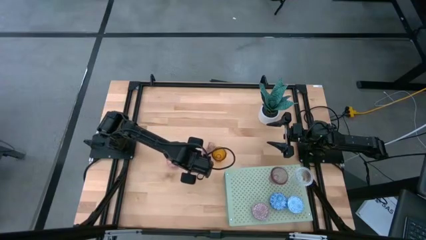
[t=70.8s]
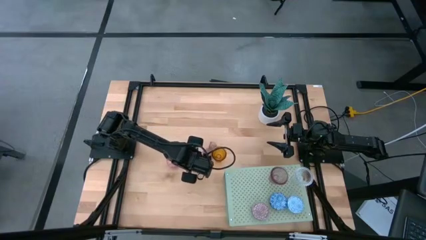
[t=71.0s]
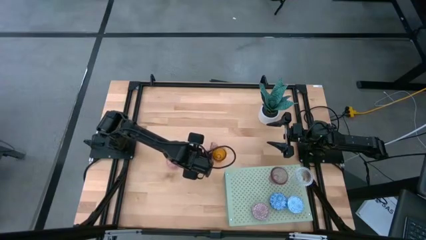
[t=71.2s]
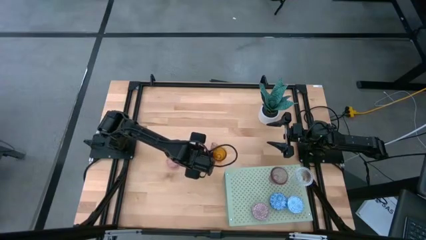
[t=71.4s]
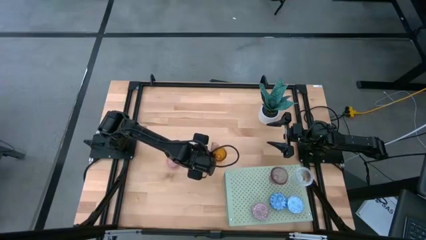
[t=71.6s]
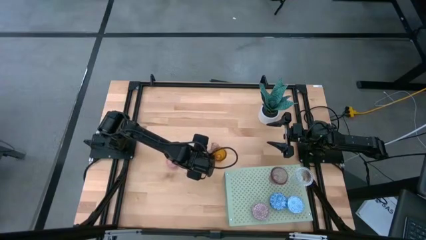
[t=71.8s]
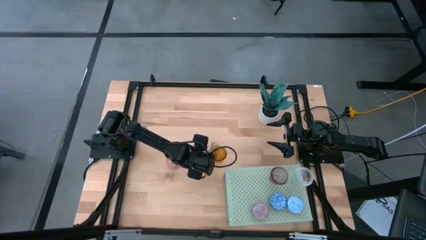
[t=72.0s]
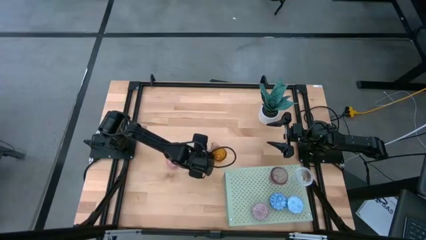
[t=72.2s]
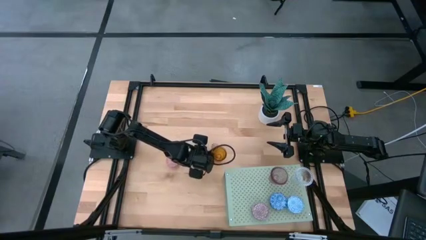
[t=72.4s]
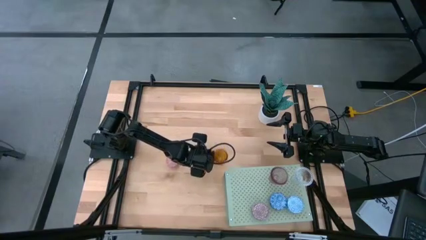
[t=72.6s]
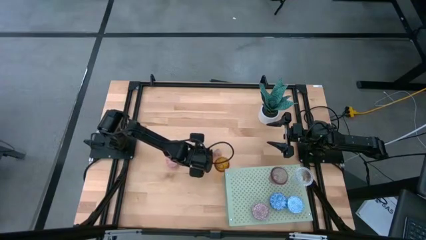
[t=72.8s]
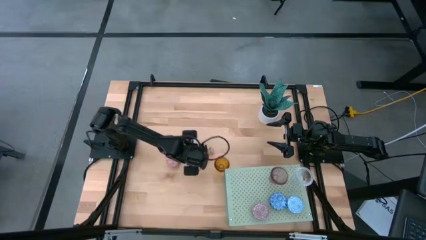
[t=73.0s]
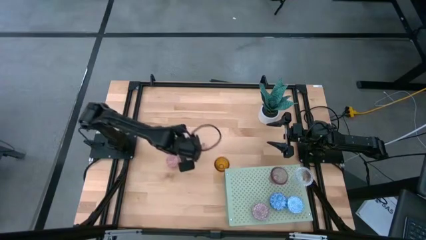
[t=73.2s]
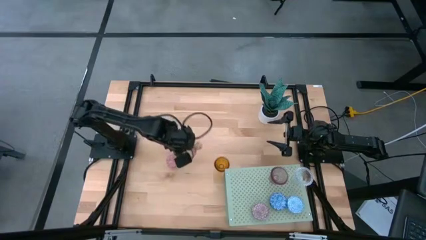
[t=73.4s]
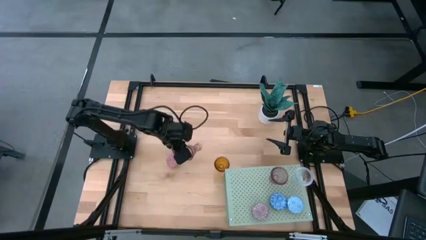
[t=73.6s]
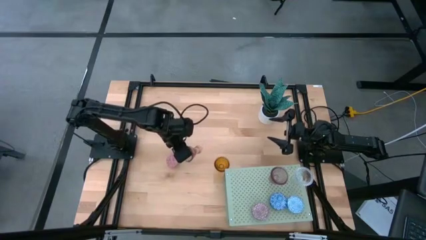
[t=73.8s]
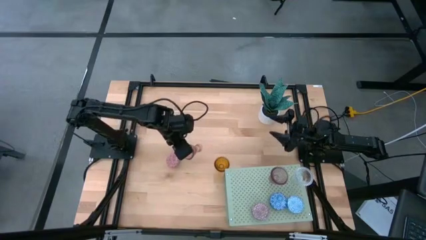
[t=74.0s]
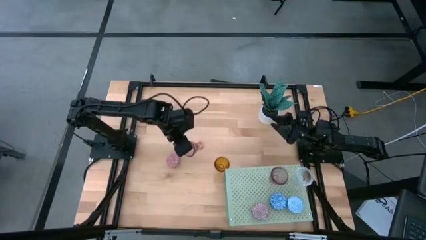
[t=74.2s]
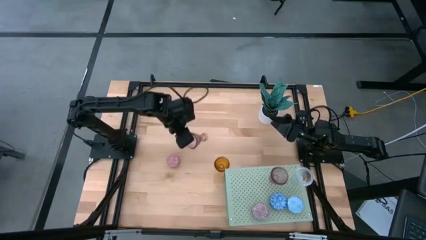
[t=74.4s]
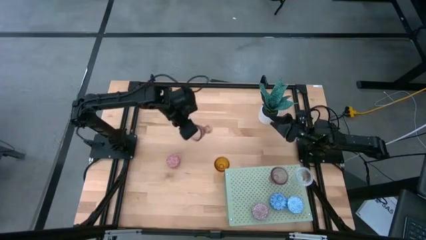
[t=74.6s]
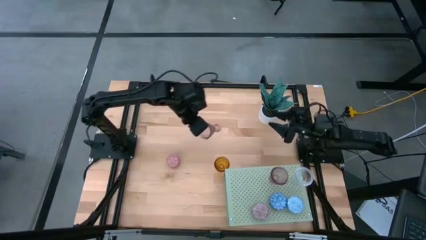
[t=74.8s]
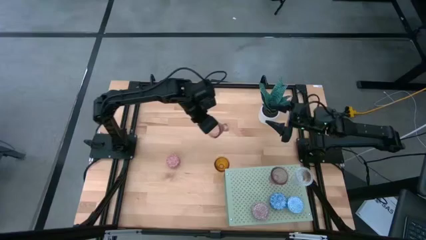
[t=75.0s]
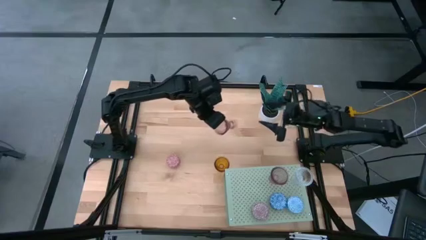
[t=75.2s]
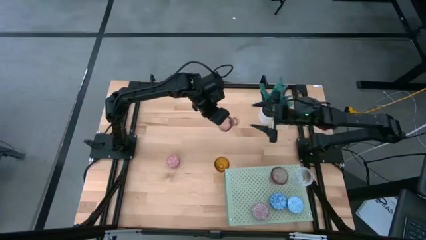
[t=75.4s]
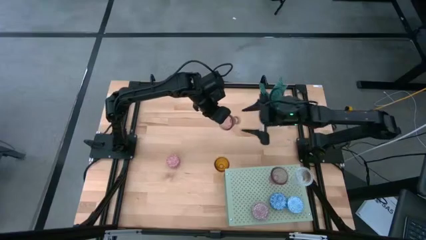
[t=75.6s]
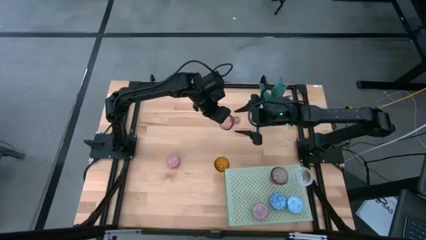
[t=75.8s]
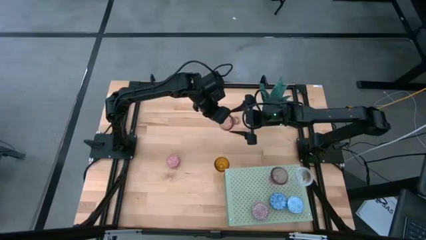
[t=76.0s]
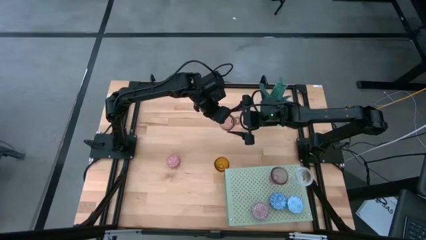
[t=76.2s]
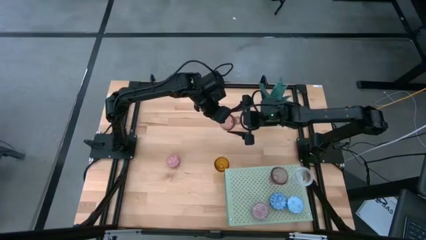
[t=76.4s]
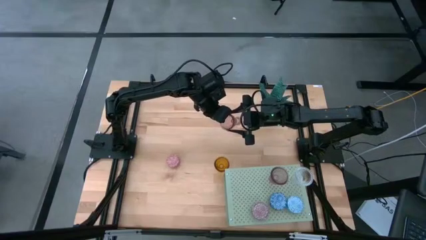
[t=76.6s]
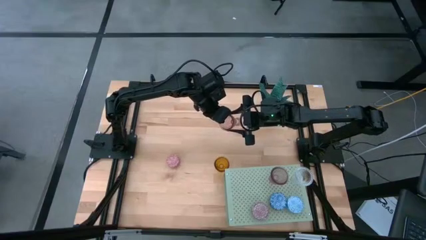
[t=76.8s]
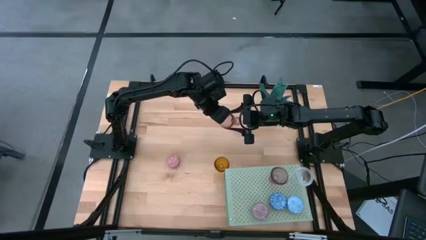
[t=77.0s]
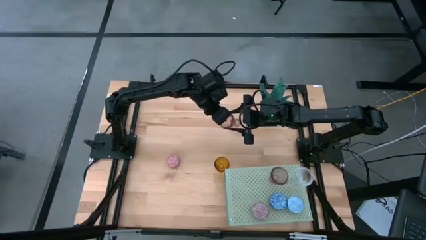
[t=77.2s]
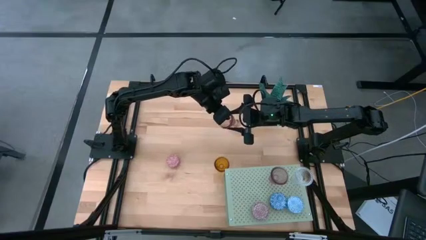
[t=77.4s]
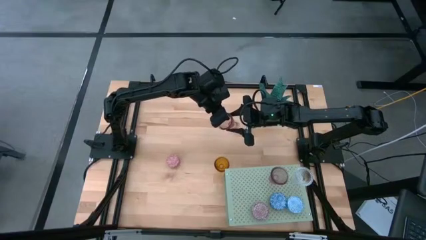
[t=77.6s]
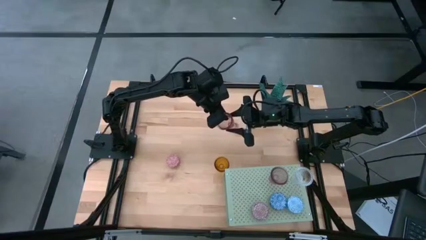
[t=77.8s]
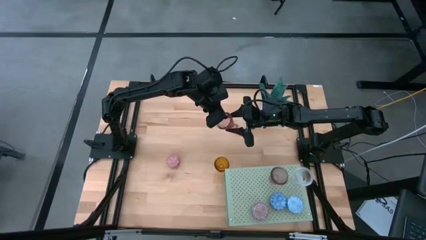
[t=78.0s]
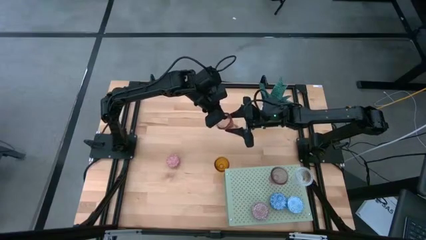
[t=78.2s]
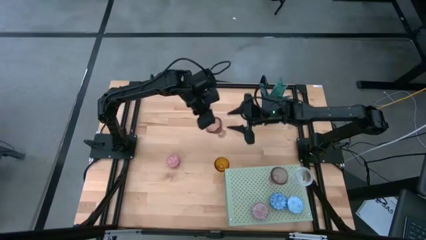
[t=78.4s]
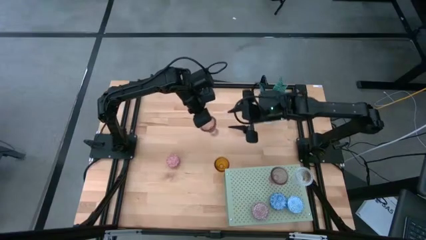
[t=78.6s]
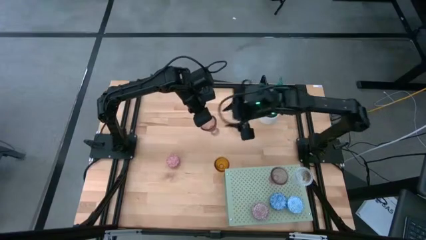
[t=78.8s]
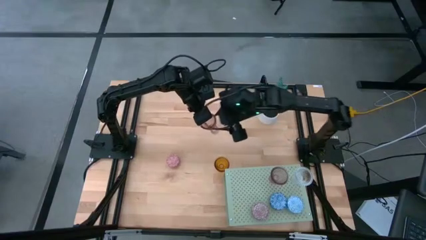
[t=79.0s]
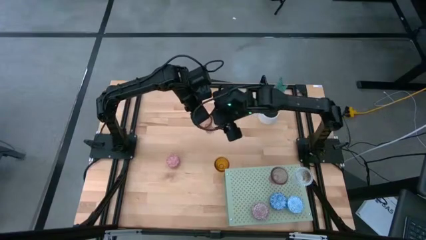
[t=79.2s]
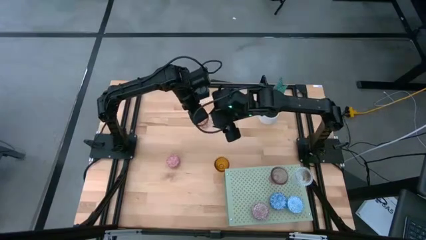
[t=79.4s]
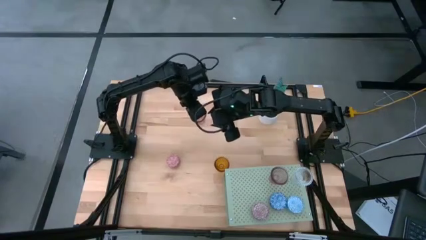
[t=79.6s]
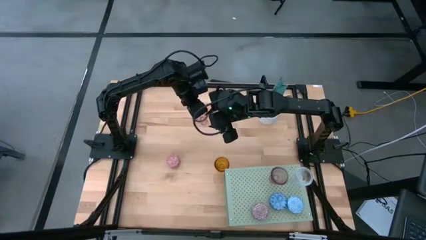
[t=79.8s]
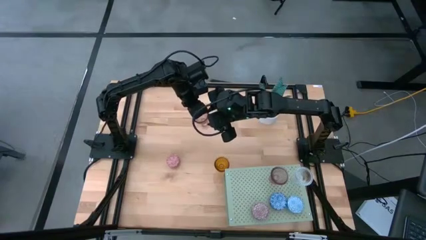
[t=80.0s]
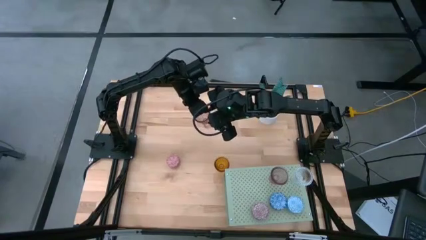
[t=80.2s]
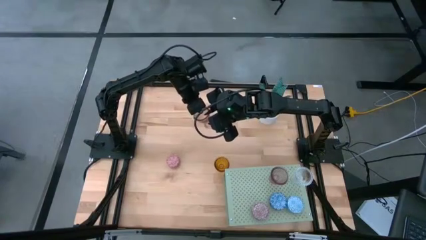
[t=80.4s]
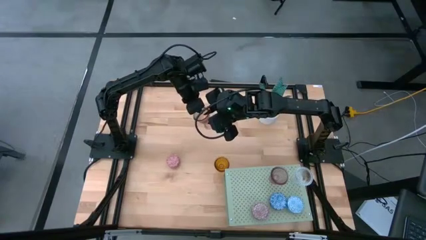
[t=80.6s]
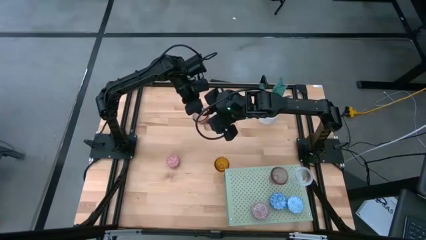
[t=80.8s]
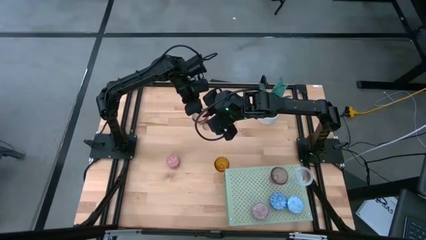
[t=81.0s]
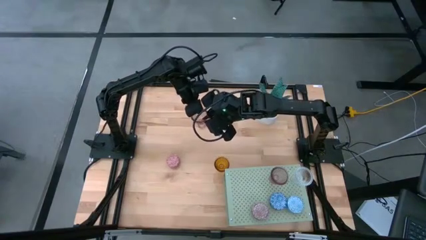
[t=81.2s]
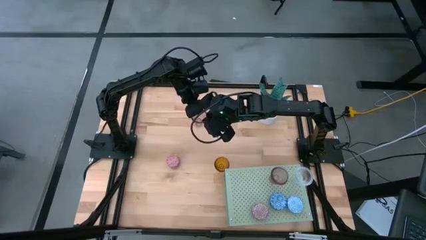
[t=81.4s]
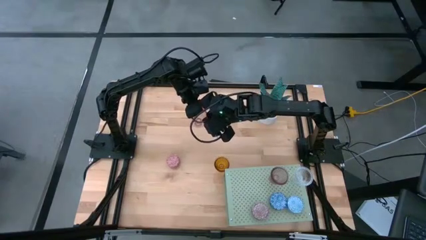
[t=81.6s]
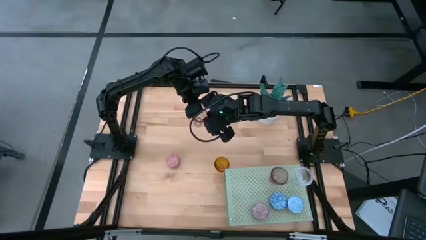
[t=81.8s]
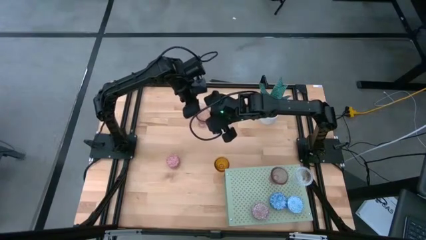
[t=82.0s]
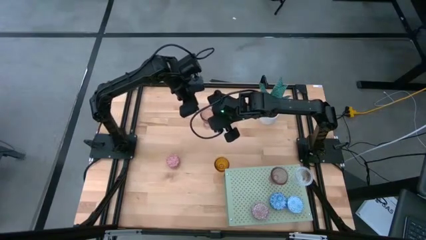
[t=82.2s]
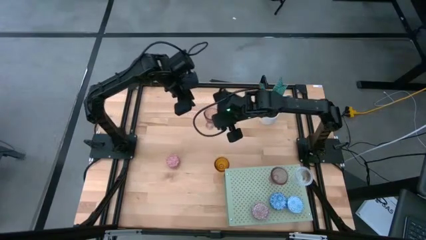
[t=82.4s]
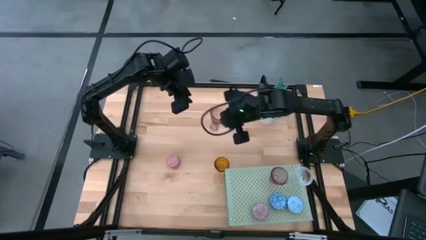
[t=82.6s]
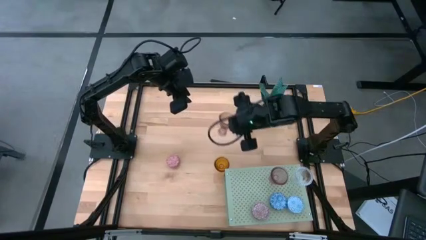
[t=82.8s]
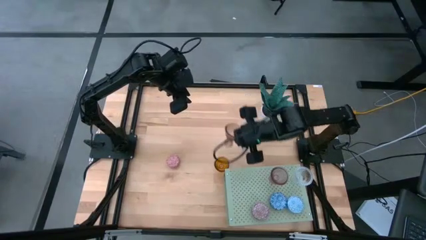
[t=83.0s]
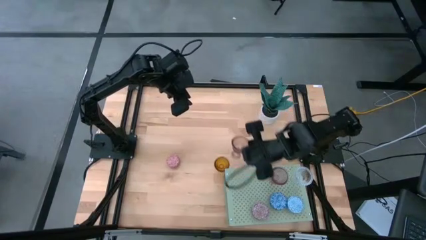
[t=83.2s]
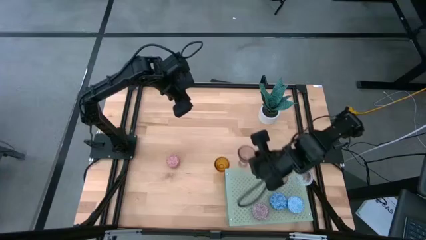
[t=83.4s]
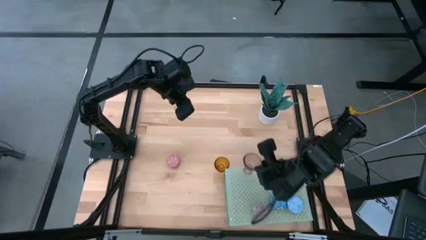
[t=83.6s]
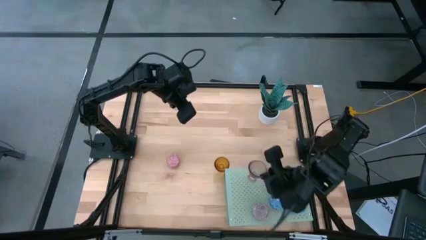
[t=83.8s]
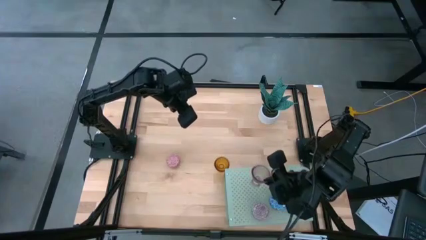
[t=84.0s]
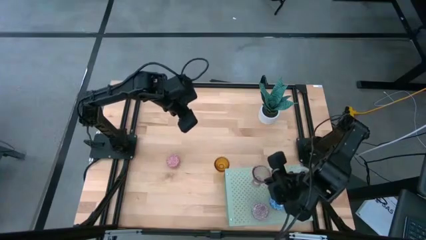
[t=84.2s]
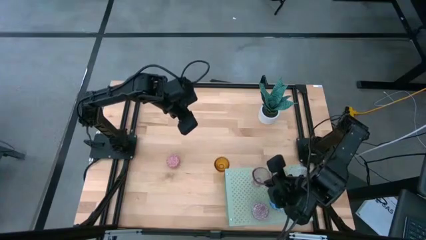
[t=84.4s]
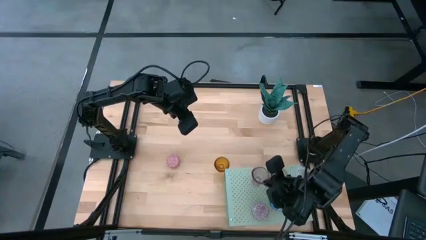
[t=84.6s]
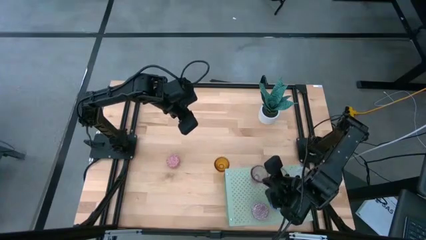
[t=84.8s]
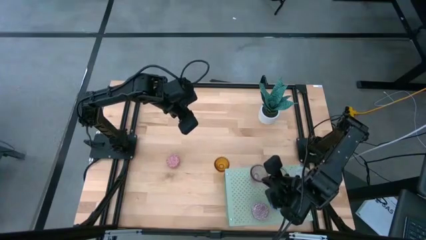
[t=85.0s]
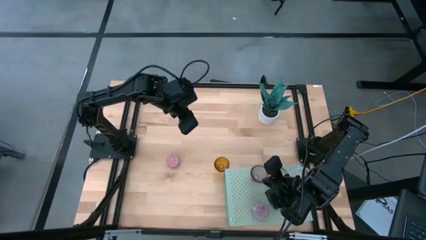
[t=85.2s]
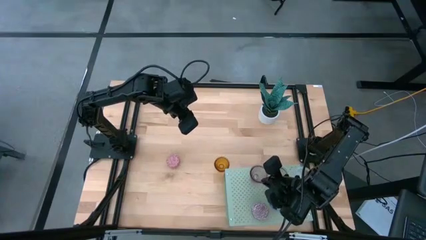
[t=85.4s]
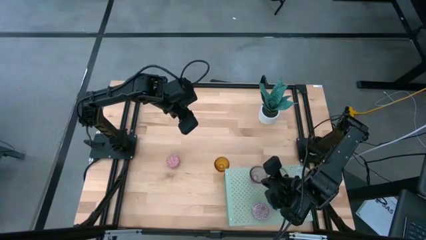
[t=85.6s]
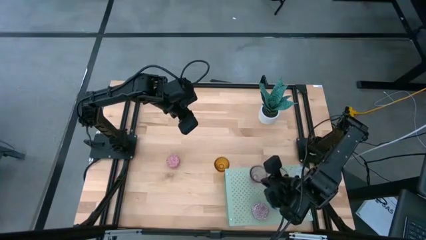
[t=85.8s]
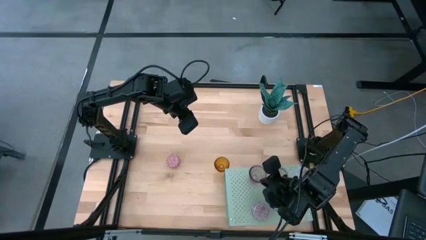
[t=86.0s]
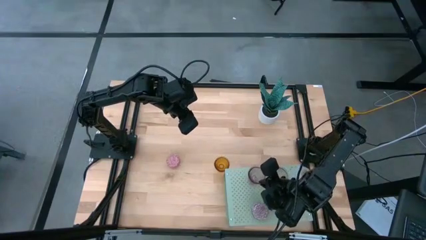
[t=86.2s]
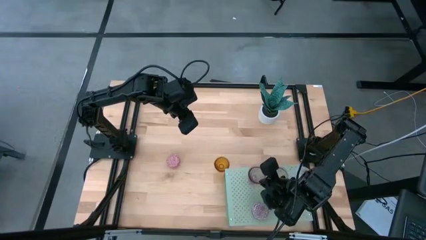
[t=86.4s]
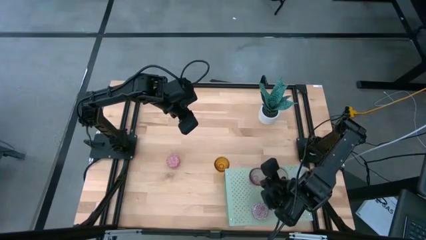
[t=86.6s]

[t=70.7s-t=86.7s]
Task: Pick & Place candle stick holders
Put the pink glass candle holder on the shelf

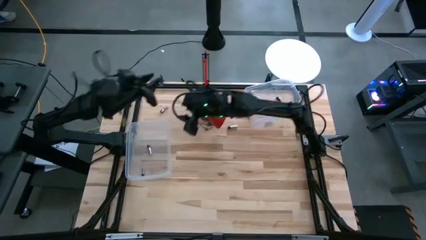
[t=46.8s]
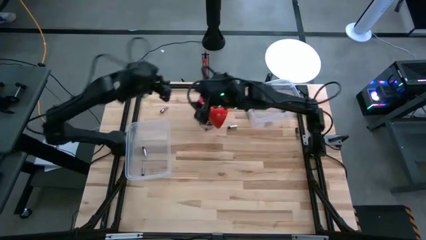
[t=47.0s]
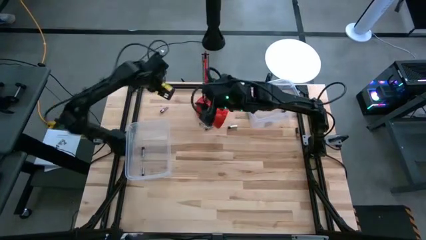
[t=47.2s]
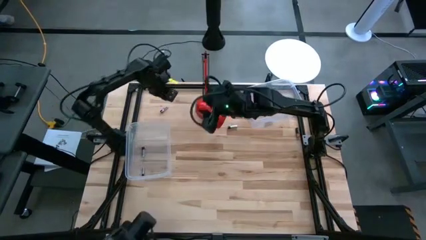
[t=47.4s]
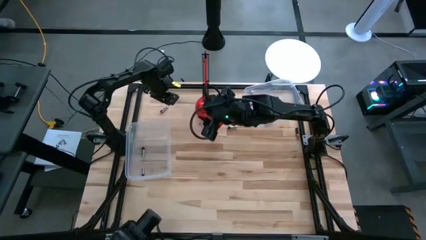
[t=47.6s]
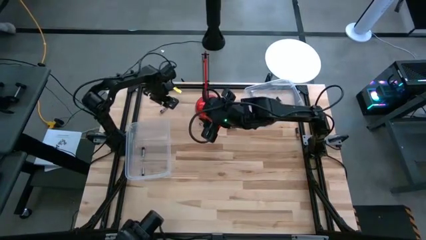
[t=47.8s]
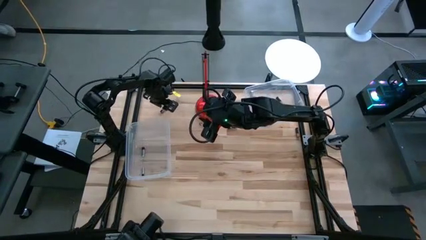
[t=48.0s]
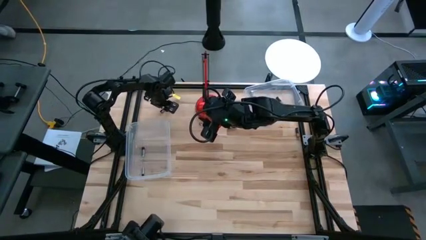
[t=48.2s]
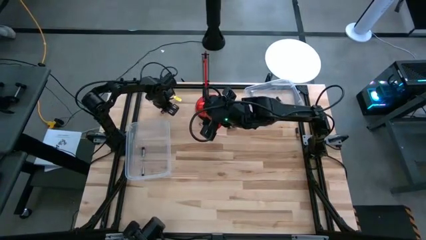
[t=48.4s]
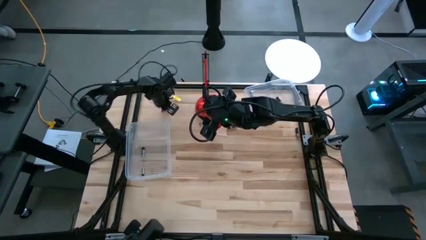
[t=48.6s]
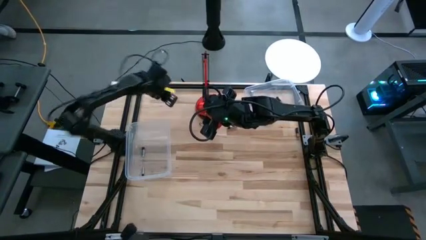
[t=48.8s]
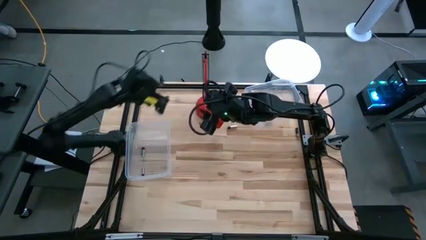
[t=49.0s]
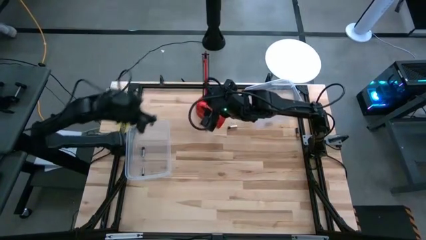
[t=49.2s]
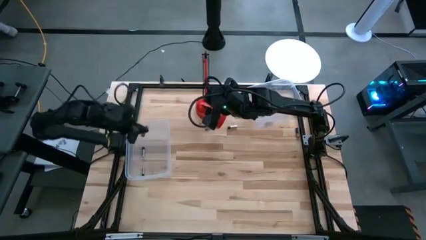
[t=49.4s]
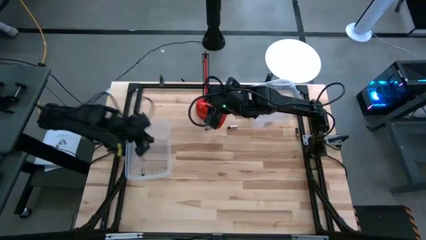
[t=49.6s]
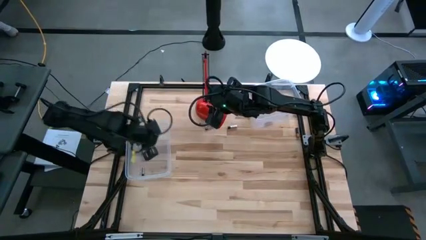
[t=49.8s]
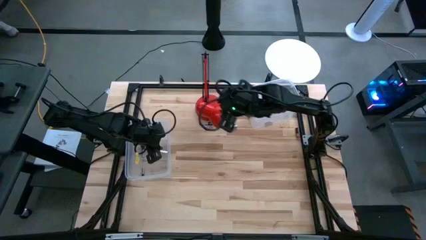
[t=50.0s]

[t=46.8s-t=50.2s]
Task: Sort batteries
Put the silver battery into the bottom transparent bin
